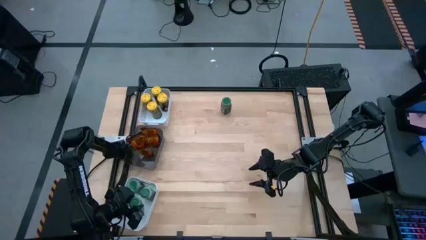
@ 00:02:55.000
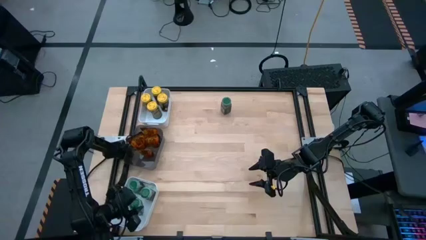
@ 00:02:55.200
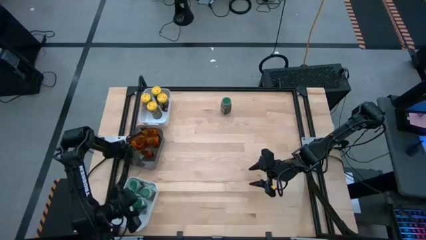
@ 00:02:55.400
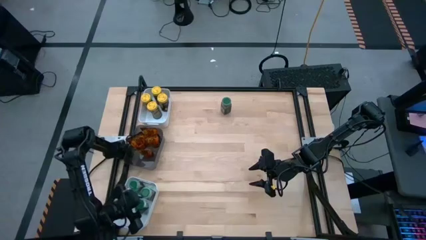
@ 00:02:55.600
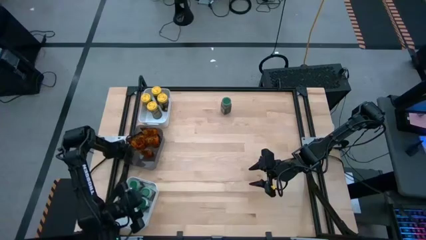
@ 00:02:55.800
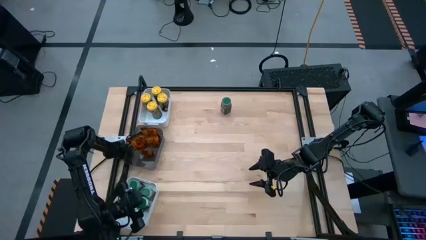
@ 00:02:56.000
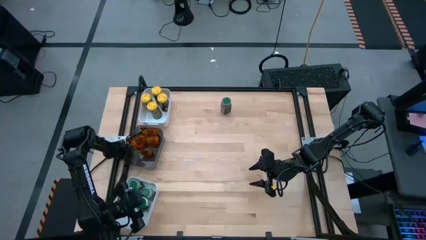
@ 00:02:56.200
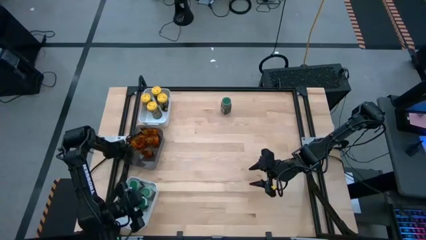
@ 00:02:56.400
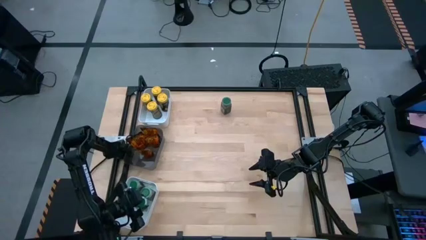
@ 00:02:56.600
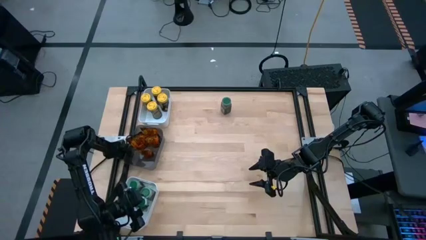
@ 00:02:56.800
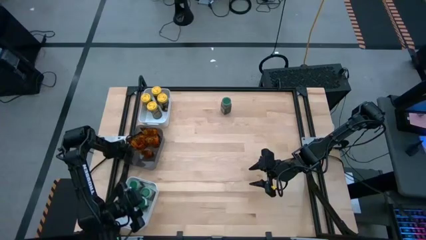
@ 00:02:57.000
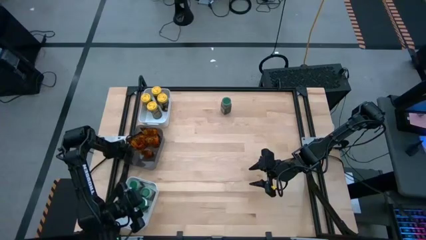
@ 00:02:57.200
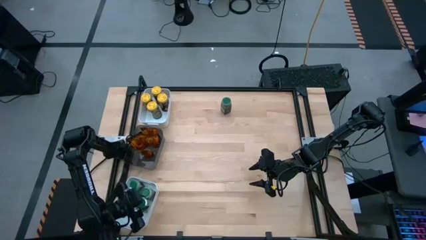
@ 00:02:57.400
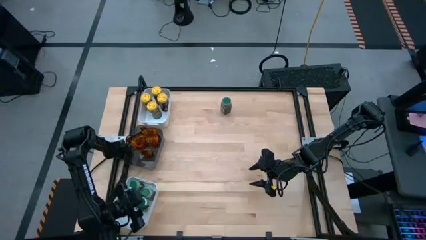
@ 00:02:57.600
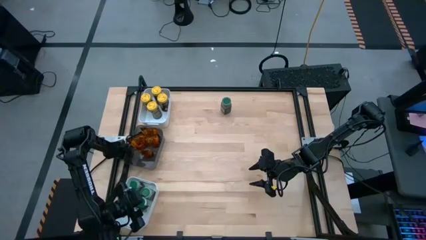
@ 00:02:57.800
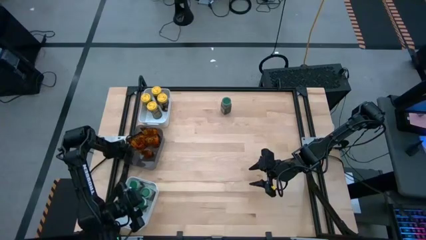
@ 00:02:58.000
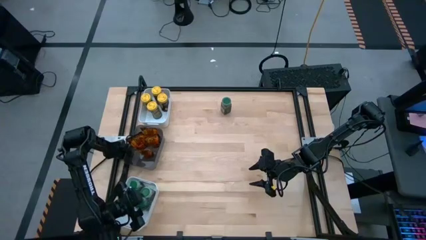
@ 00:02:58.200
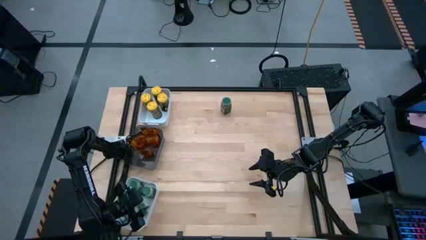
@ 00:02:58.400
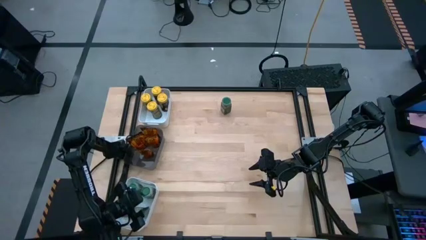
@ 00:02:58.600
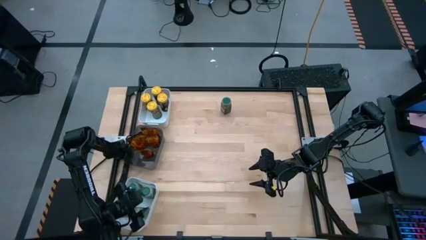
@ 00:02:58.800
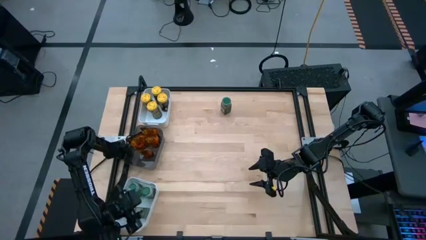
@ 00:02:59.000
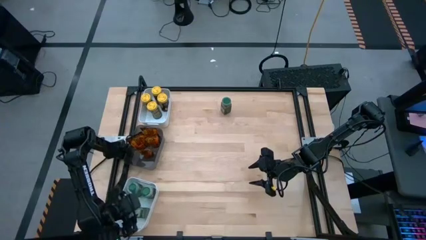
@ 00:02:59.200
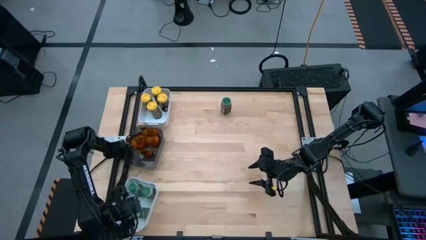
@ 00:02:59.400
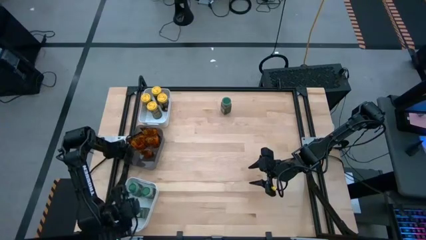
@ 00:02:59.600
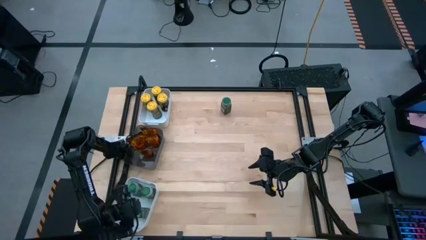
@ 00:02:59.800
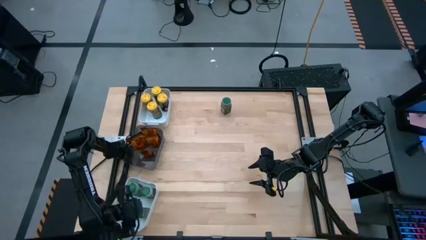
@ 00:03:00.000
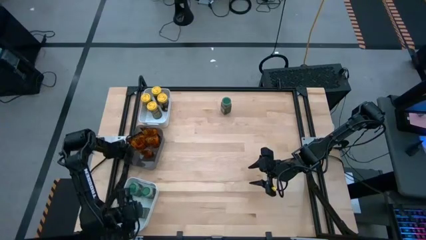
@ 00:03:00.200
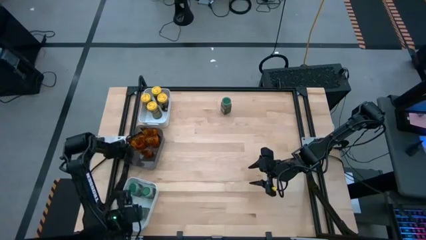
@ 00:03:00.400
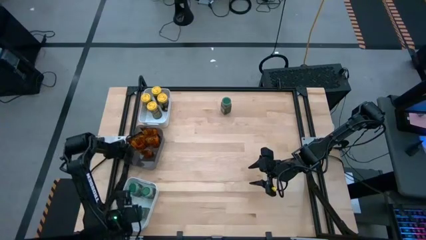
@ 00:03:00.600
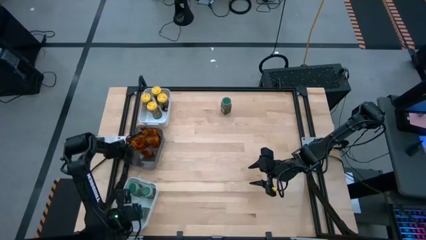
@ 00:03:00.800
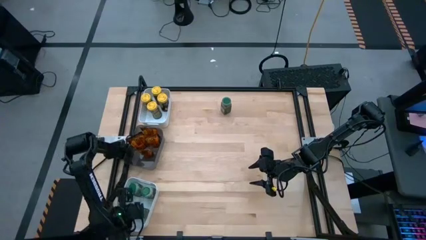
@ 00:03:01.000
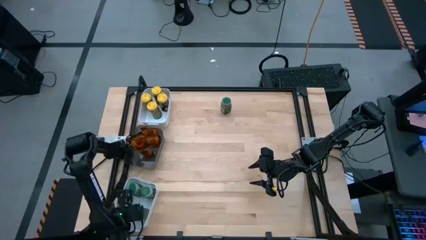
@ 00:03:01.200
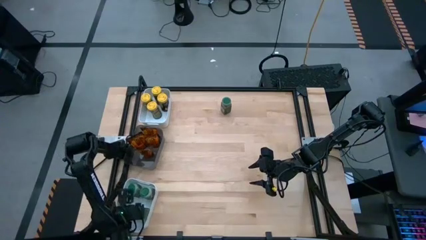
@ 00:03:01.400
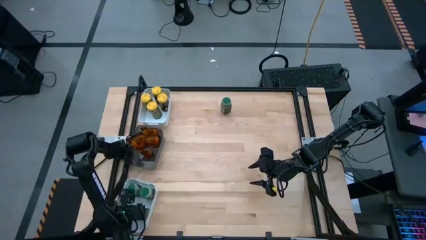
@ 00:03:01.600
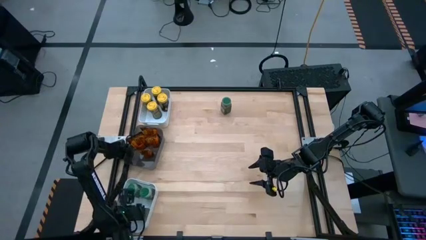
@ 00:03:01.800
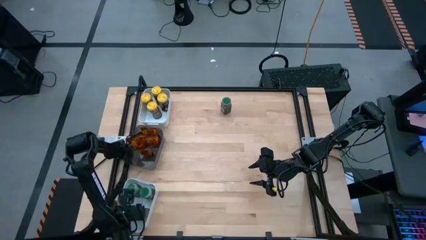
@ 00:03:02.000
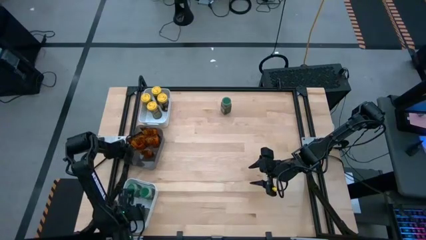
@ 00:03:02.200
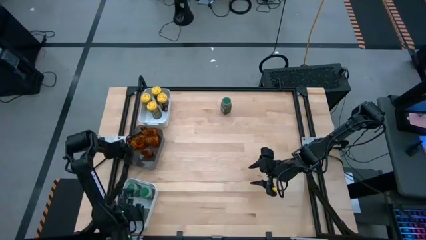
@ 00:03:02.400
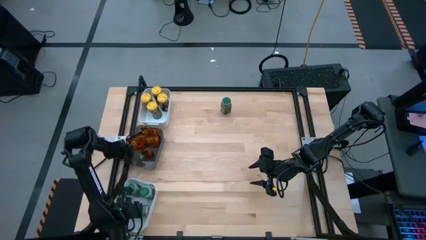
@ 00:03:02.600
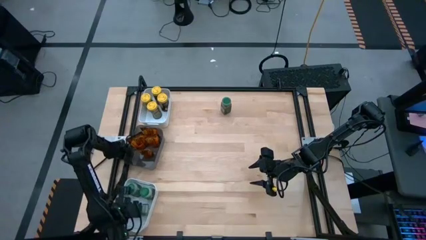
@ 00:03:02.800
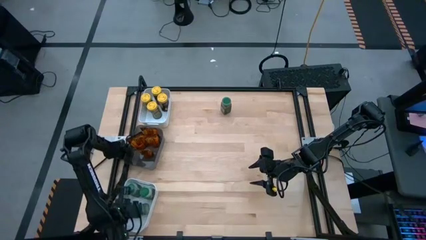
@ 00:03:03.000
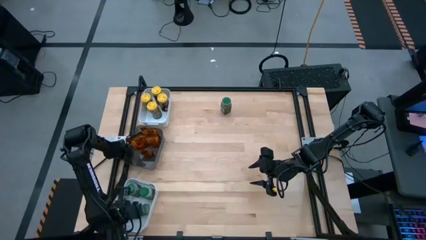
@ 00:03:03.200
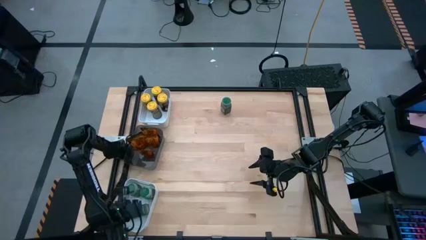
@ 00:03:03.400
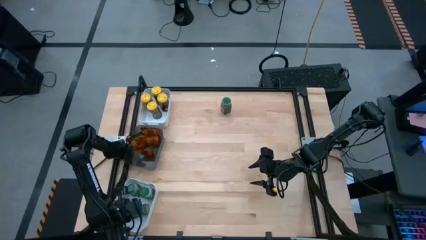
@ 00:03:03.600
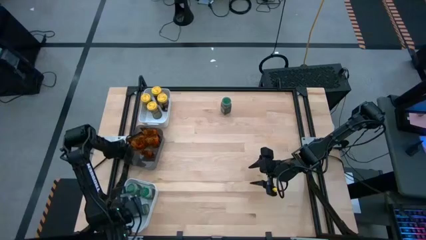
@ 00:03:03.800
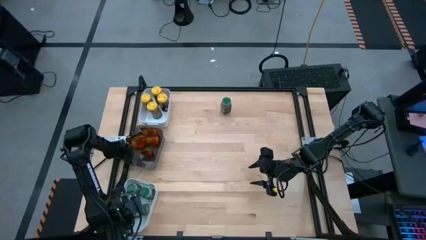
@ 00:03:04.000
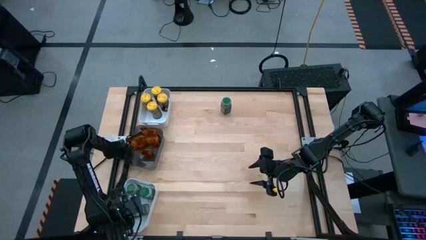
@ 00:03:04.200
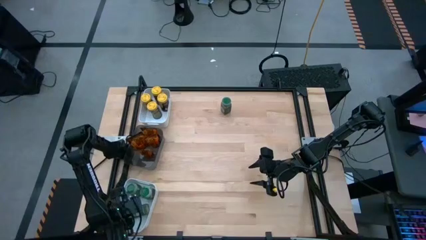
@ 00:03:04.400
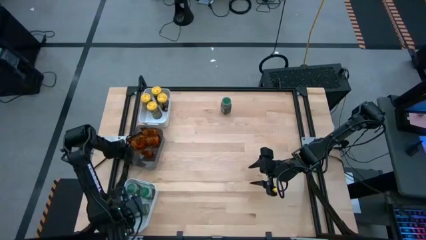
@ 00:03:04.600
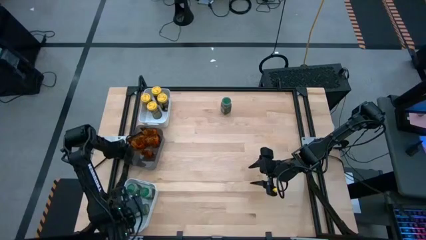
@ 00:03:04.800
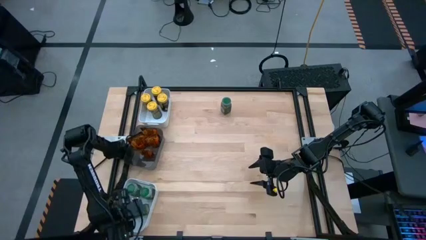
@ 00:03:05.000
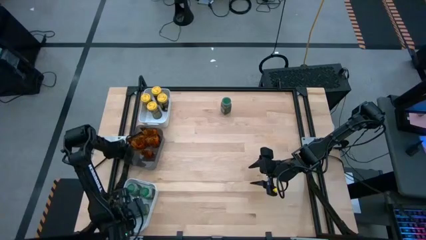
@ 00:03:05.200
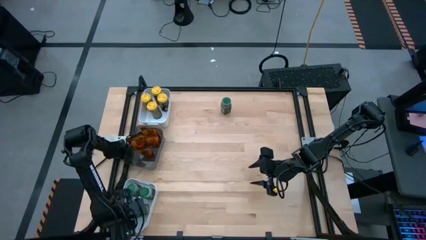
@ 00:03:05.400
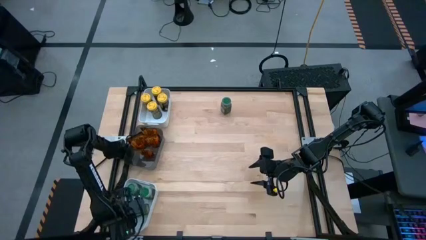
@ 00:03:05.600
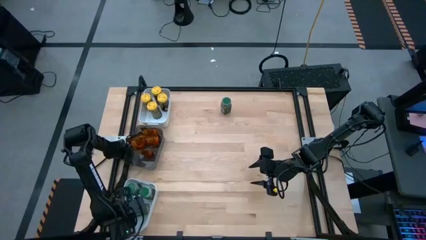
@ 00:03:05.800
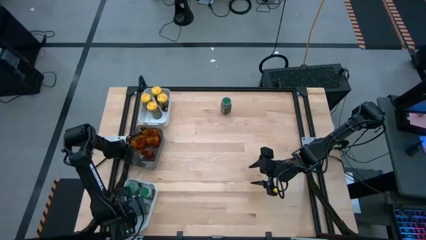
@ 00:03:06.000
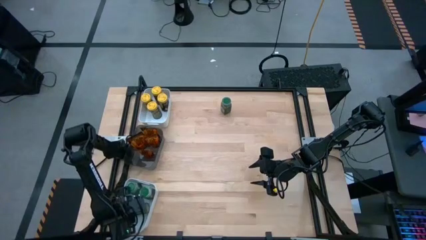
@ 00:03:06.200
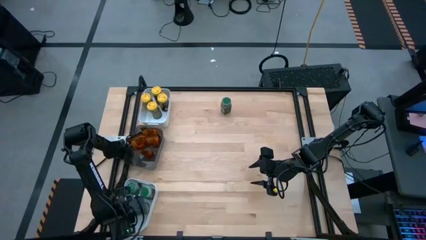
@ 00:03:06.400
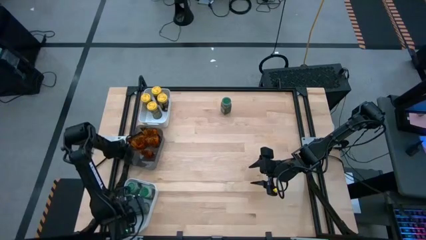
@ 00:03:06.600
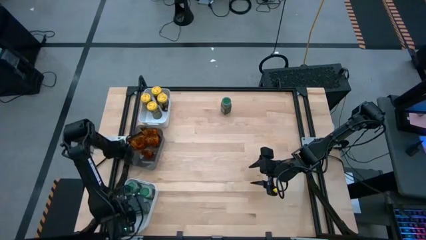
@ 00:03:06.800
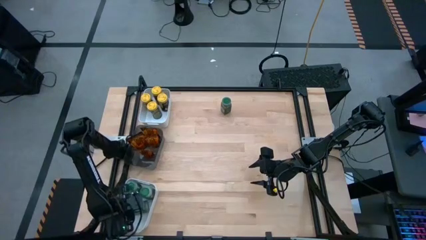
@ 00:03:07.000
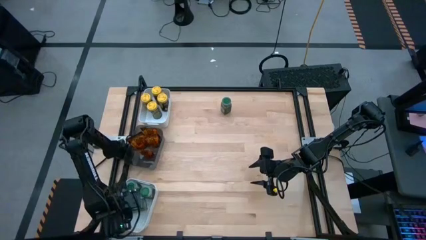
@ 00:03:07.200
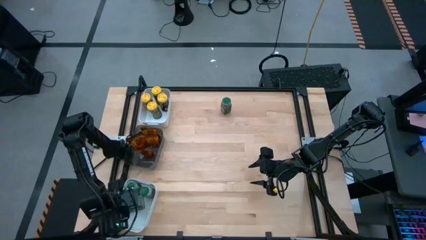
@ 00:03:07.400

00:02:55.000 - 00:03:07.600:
Task: Sort spices by type
Put the right green seasoning bottle into the bottom white bin

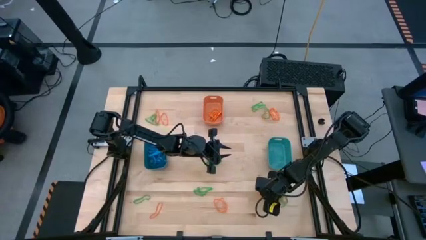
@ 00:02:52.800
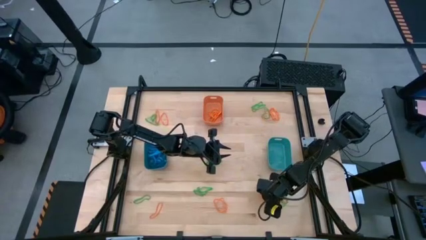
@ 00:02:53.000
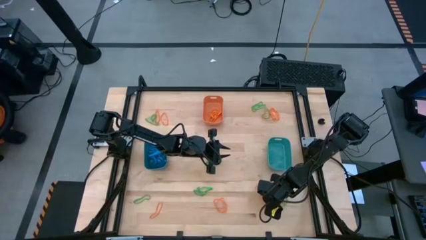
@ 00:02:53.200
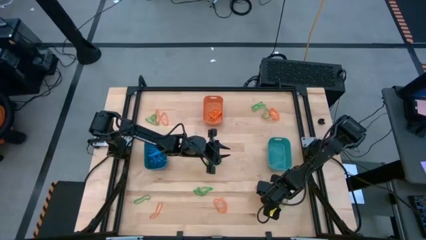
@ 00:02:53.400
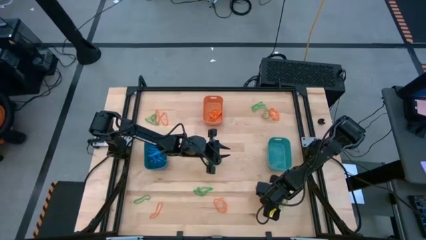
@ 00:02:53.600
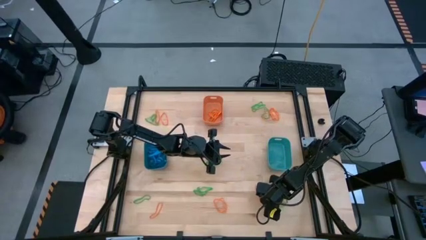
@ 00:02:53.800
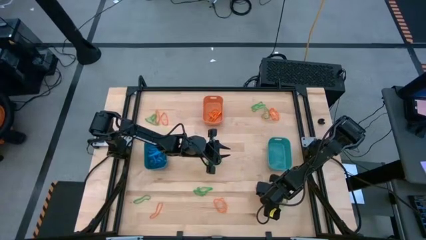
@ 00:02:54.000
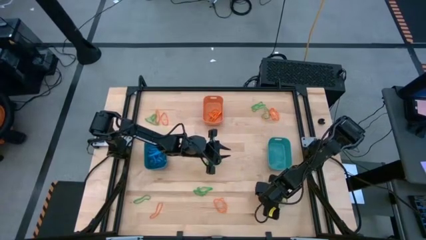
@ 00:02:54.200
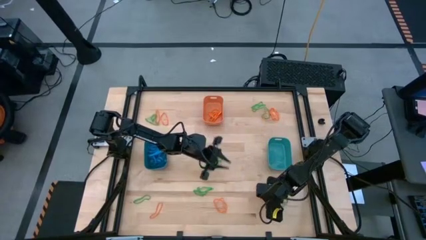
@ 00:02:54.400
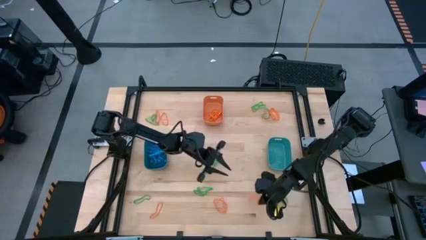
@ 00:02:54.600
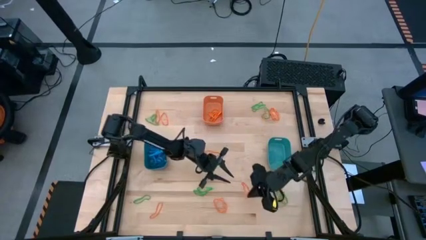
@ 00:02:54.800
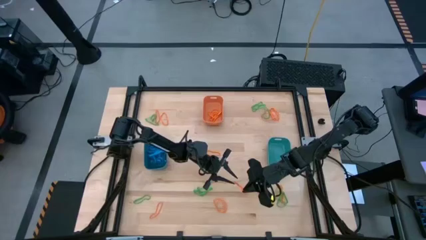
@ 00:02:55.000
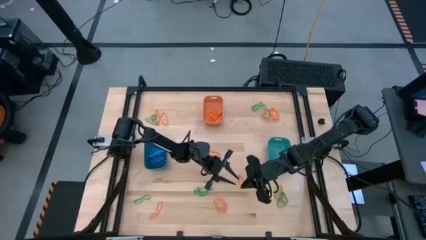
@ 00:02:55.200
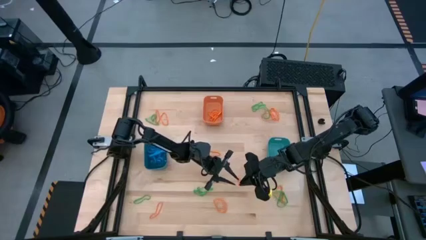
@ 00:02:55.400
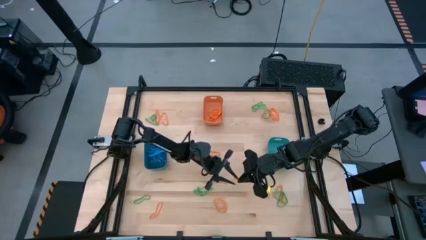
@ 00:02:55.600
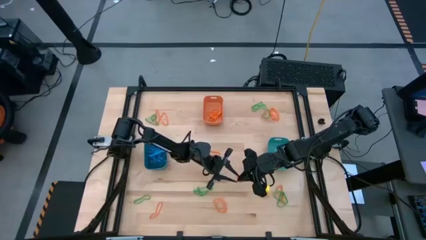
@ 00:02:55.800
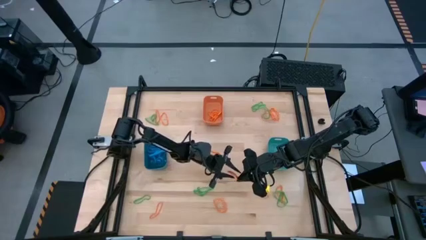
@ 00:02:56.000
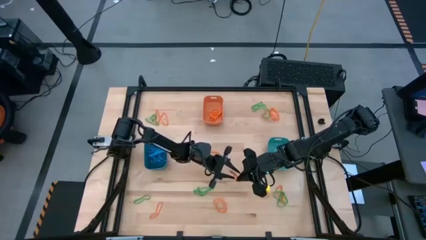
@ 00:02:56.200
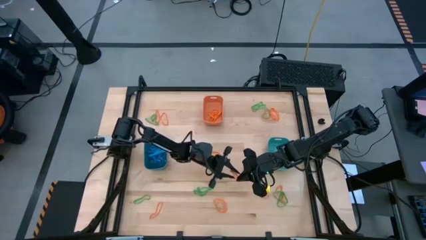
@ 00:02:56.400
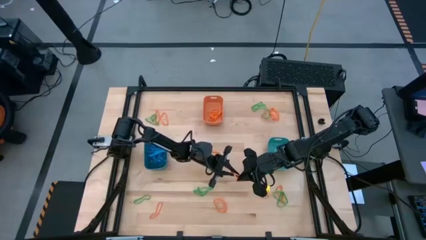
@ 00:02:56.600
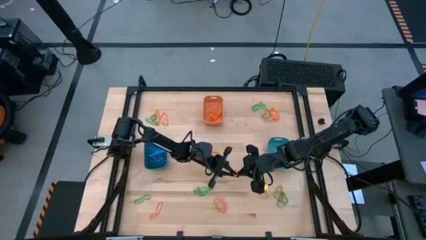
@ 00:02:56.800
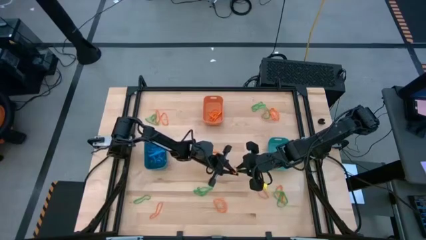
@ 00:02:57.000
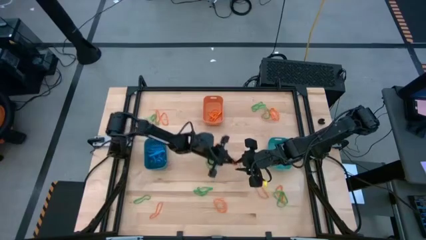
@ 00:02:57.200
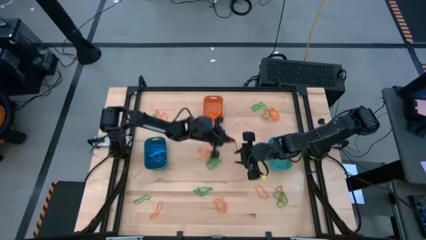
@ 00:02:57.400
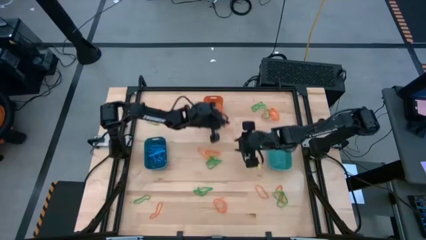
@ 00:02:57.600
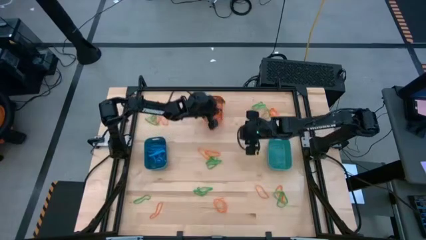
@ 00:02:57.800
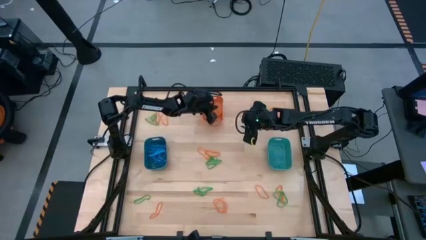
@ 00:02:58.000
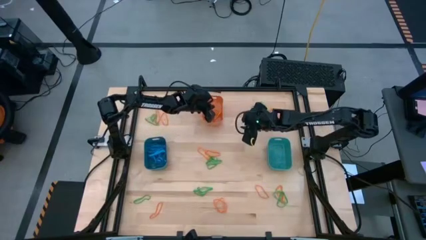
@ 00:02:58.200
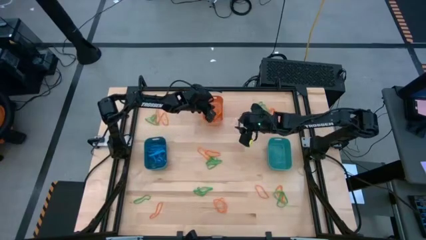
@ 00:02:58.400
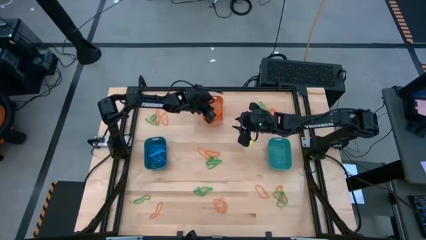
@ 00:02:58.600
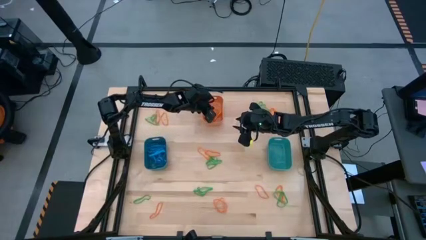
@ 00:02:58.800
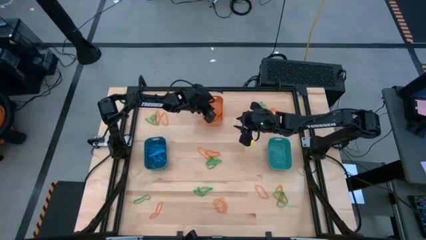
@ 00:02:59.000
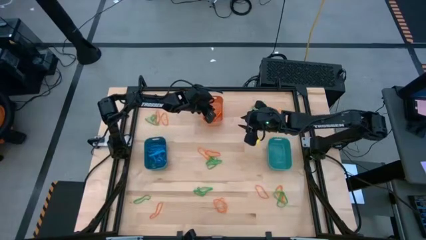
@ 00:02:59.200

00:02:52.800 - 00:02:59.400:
Task: Sort rubber bands into baskets
Put the orange rubber band into the orange bin
